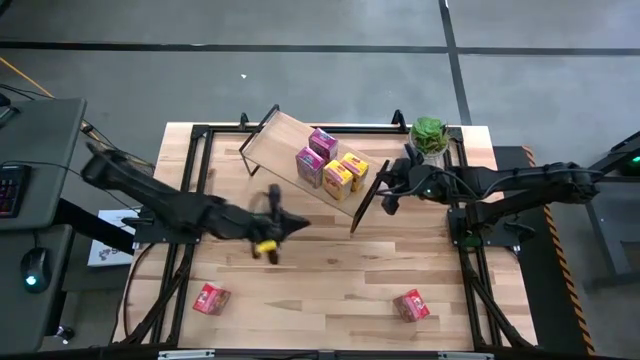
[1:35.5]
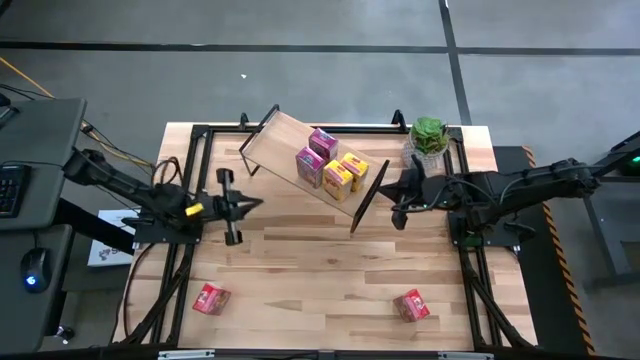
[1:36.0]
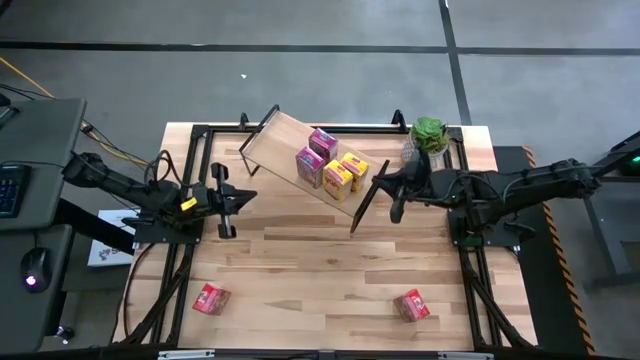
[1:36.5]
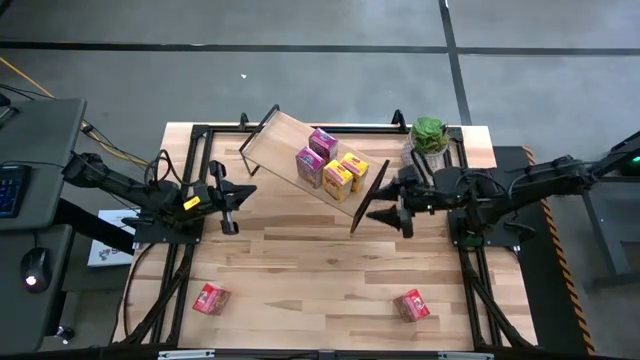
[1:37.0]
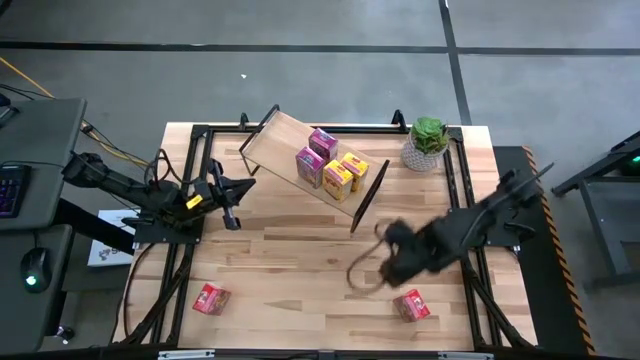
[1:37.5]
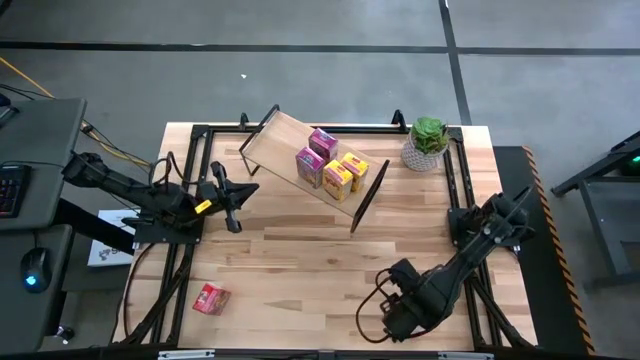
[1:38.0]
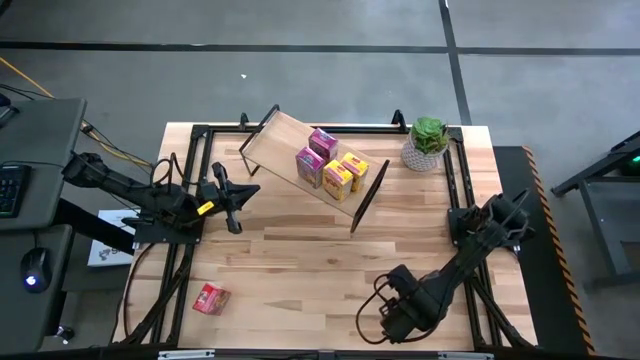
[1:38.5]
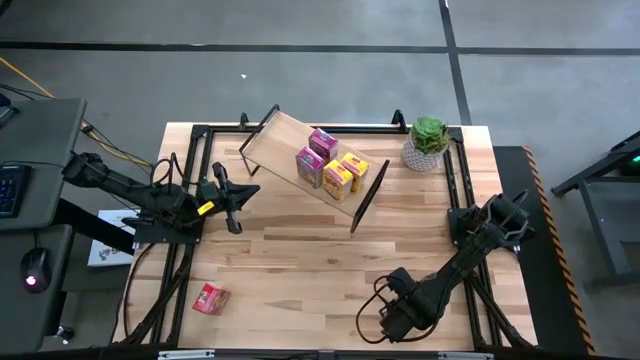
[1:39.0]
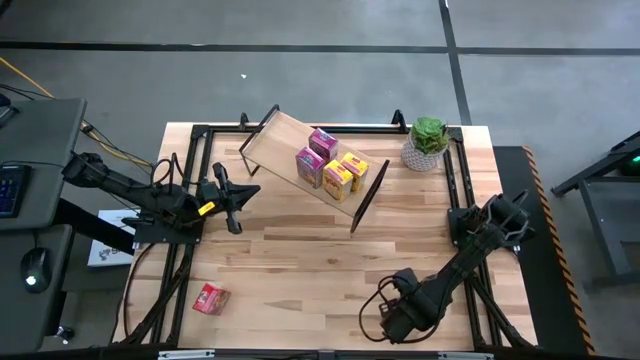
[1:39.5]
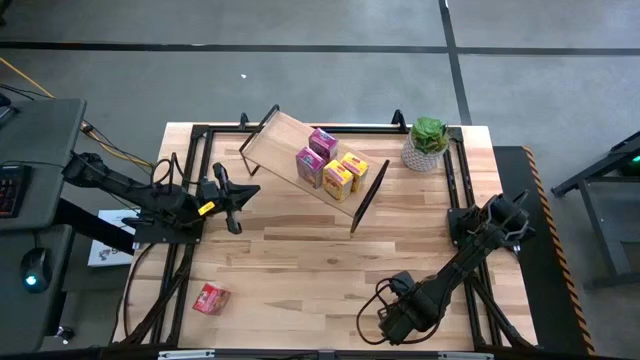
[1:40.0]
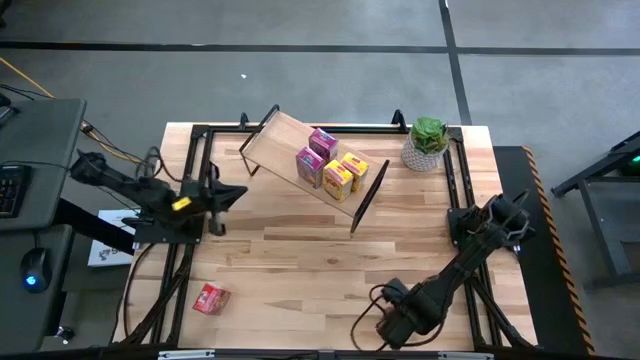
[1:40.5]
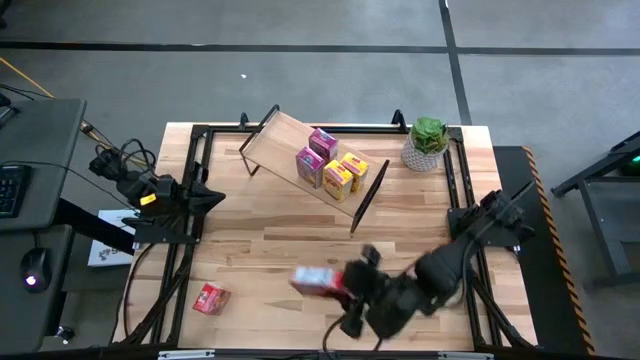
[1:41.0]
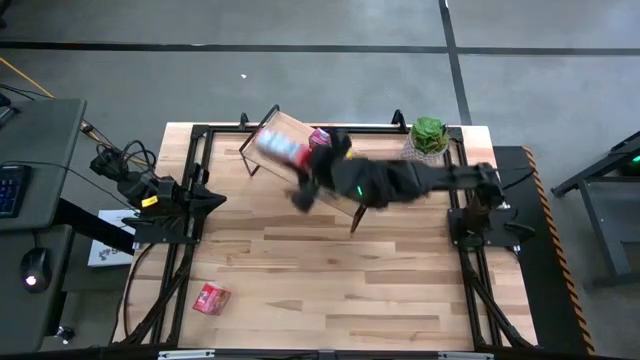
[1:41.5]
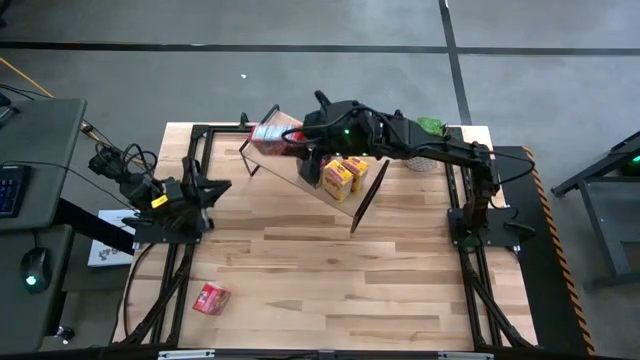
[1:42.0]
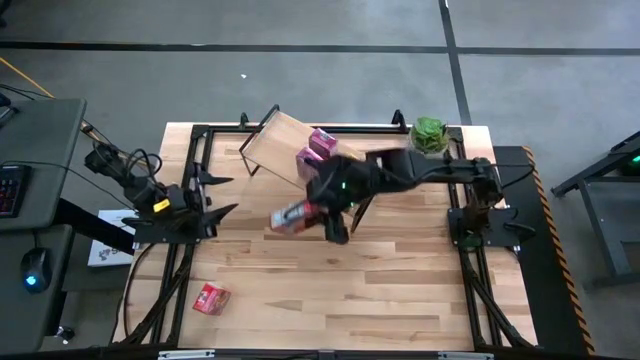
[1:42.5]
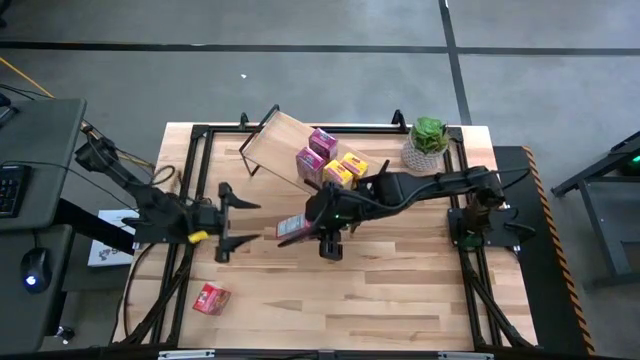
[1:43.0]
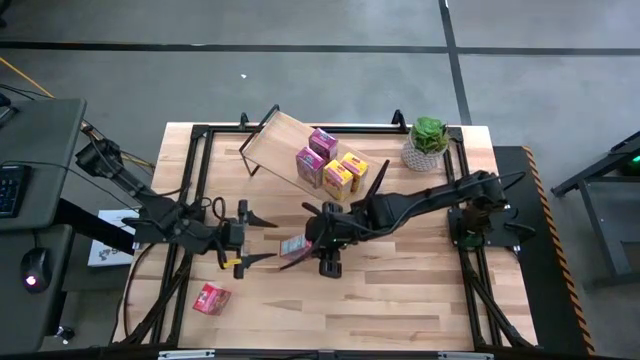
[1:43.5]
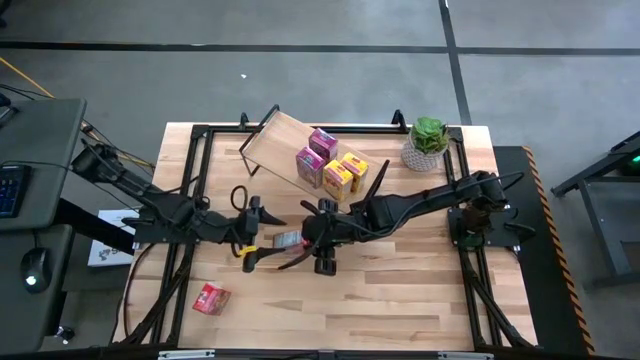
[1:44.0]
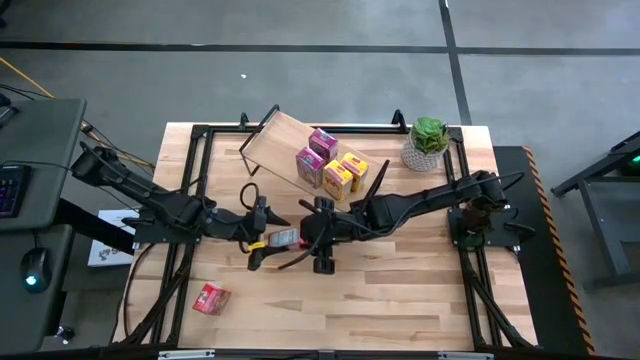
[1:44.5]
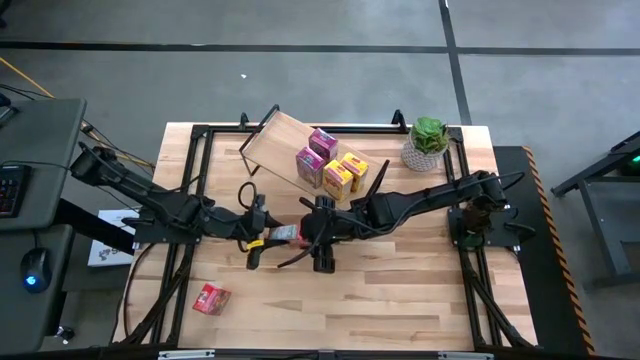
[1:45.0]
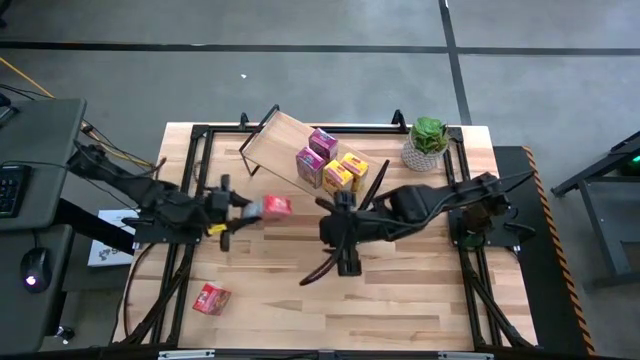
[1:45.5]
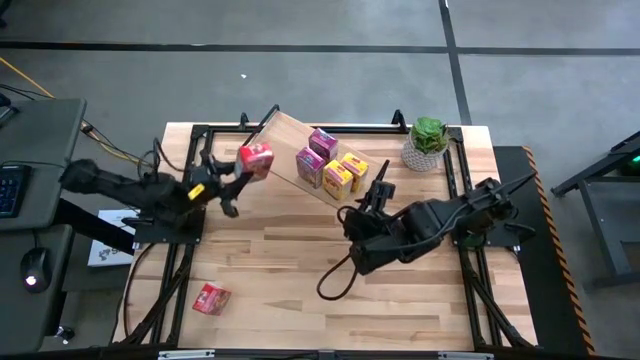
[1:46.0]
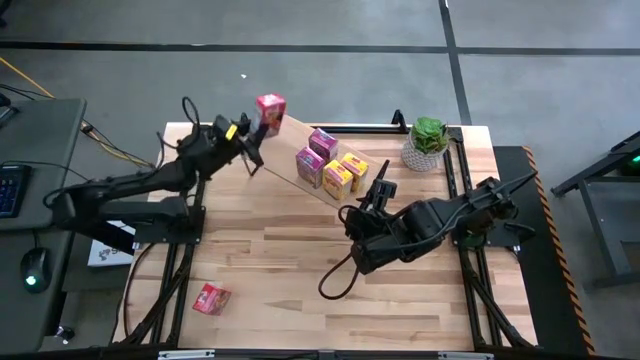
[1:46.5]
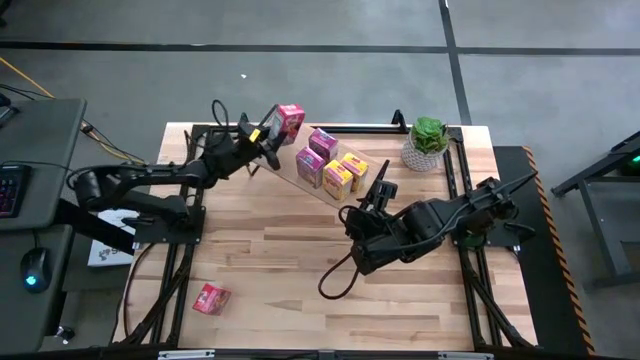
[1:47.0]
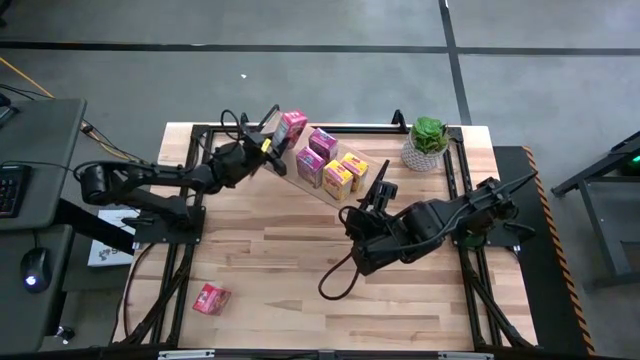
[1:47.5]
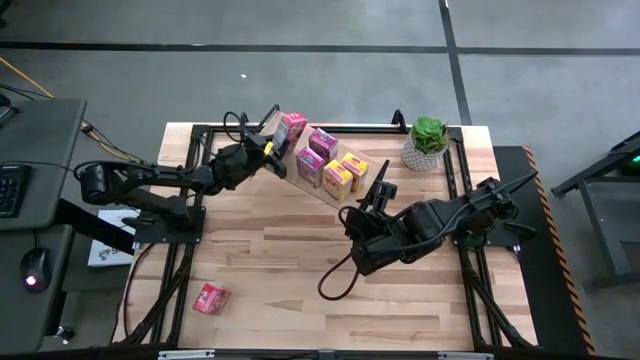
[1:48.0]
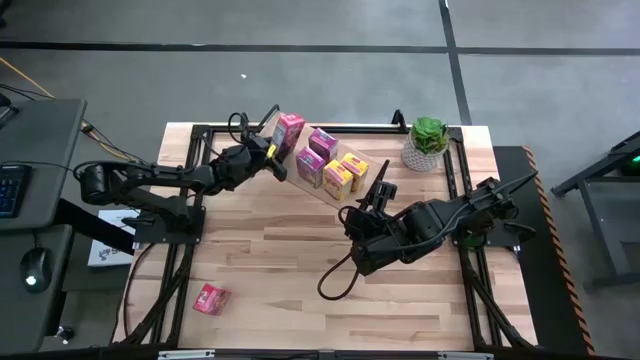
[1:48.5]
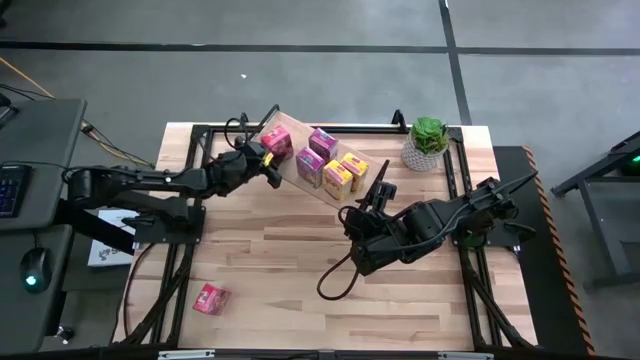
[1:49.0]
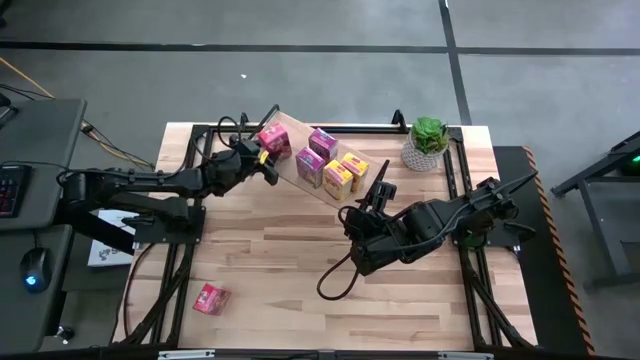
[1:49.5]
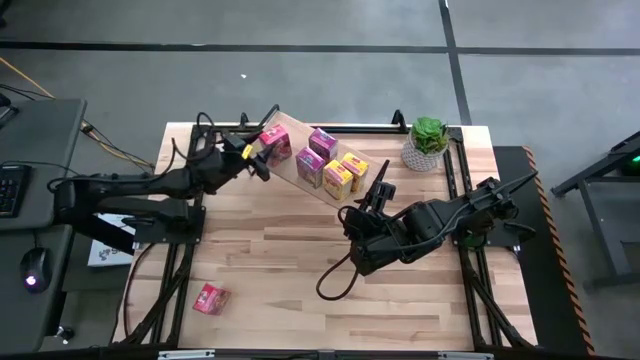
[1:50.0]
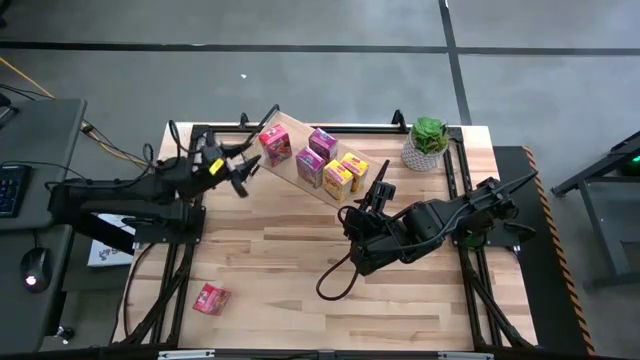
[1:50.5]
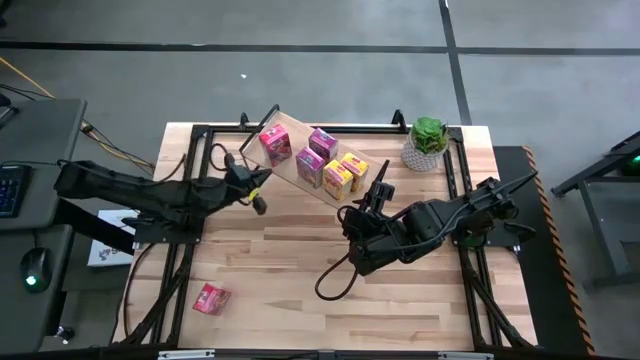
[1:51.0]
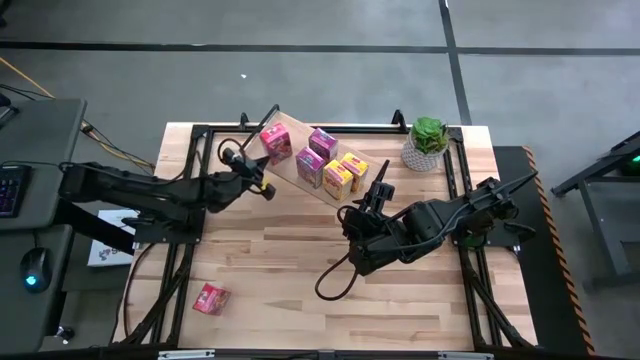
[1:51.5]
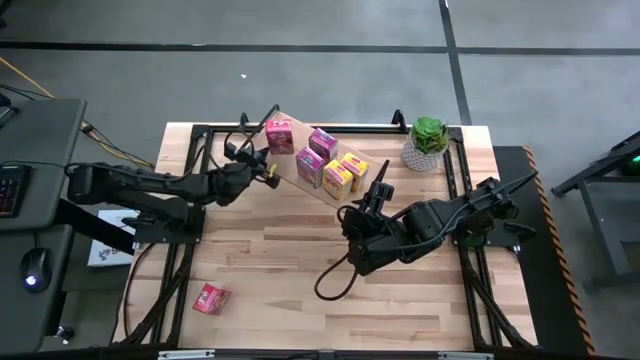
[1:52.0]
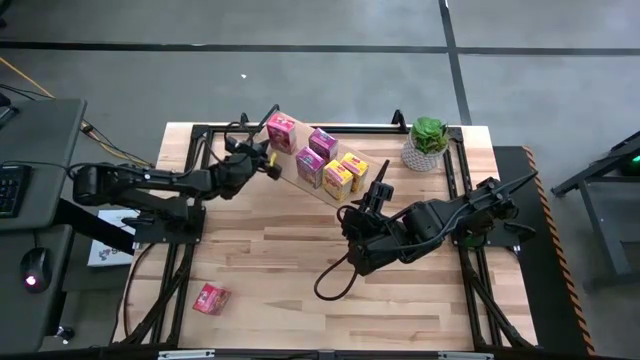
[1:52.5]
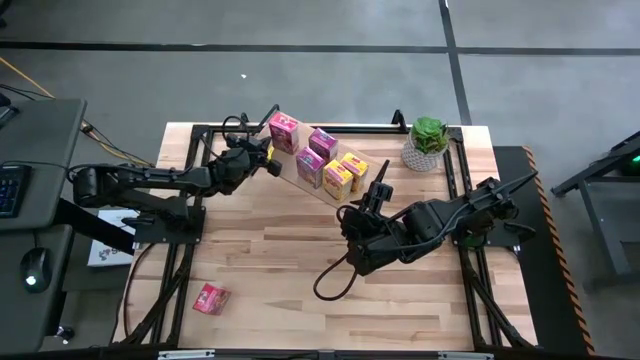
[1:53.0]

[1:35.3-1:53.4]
Task: Stack cereal on shelf
Put the bottom right red cereal box on the shelf

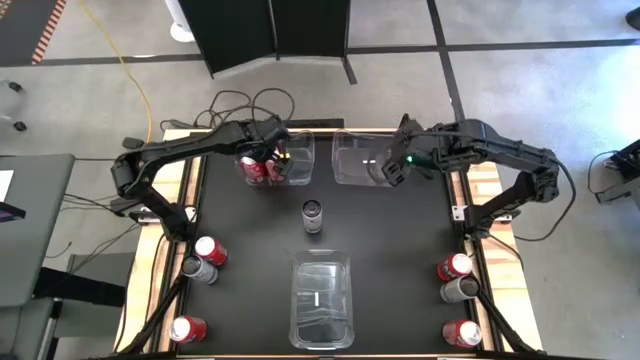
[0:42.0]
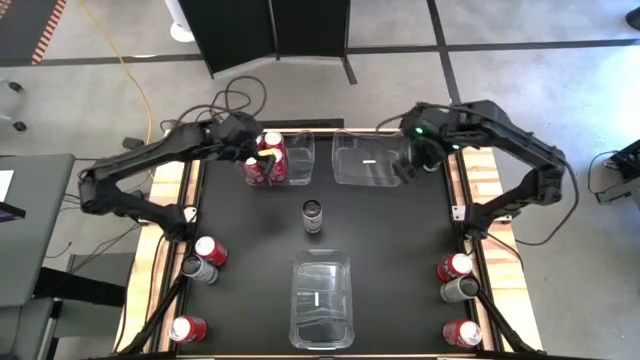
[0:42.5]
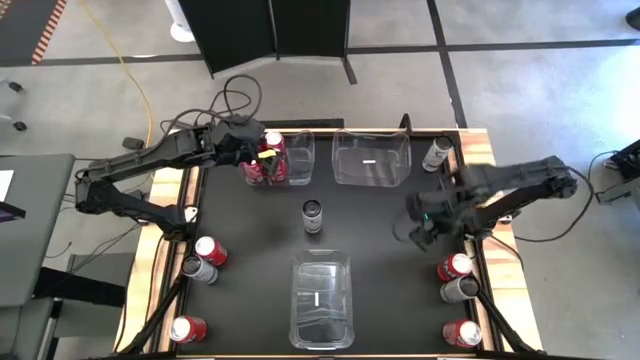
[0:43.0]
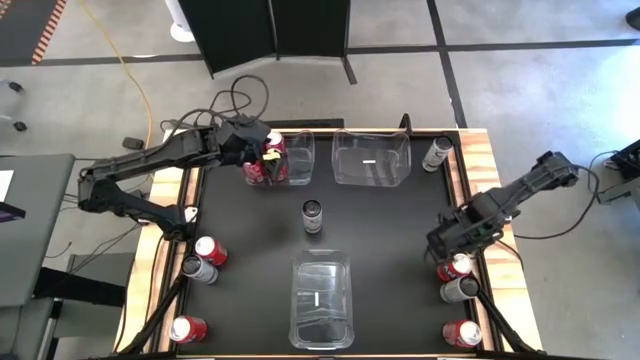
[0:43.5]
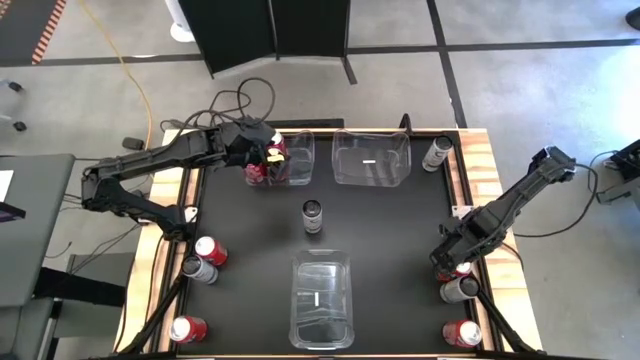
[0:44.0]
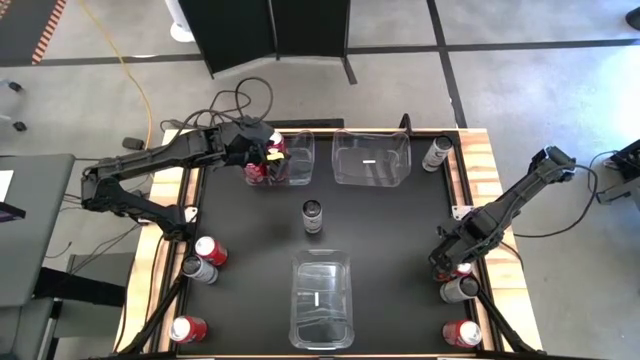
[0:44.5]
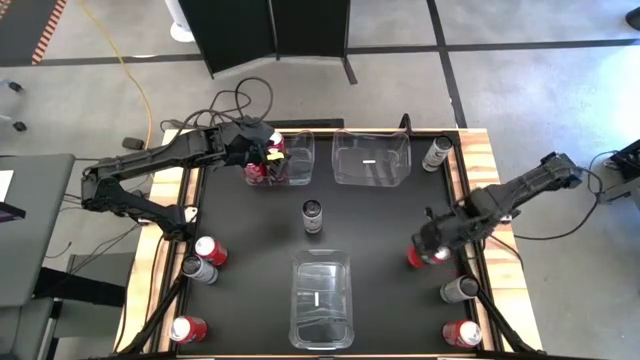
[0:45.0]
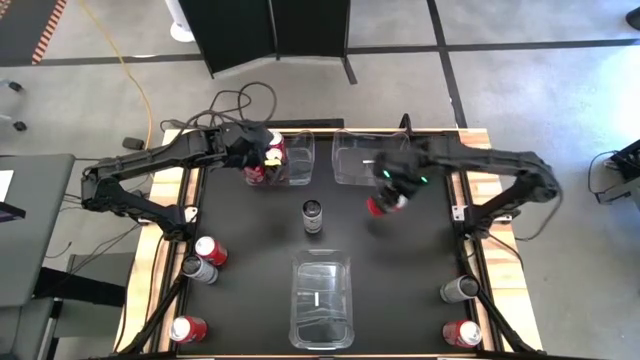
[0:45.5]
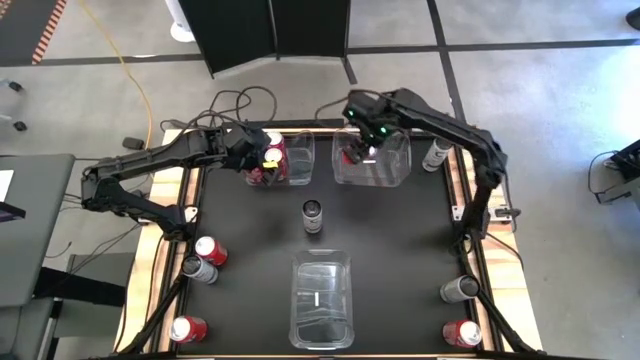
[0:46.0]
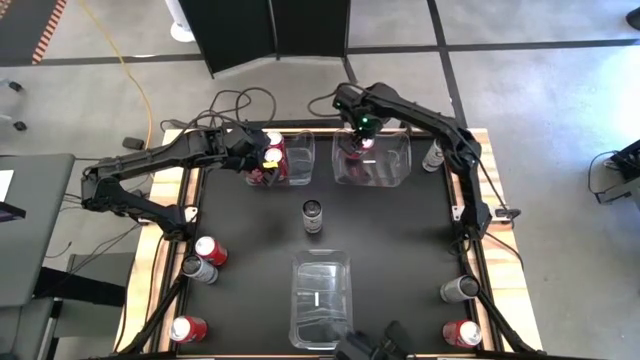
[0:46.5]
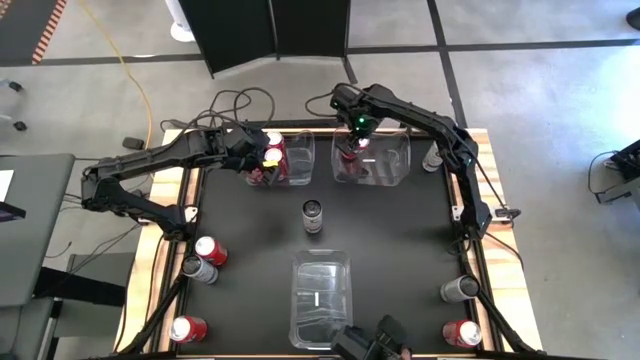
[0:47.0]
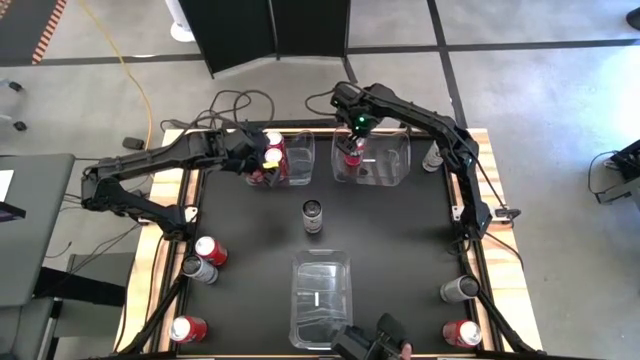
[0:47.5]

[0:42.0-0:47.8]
Task: Sort soda cans
Put the orange soda can into the right transparent bin
